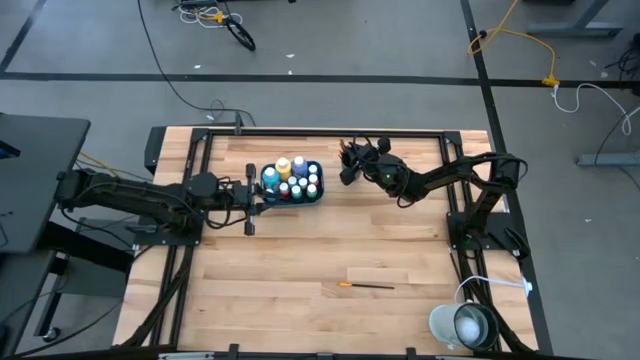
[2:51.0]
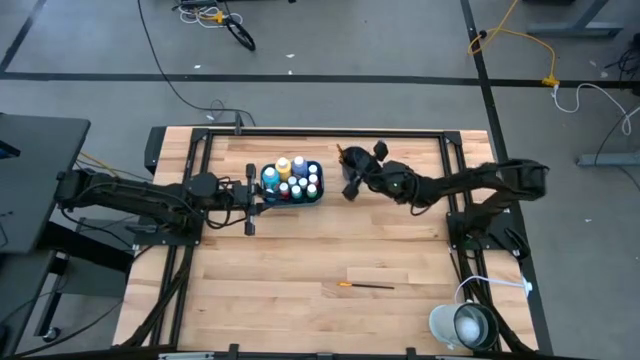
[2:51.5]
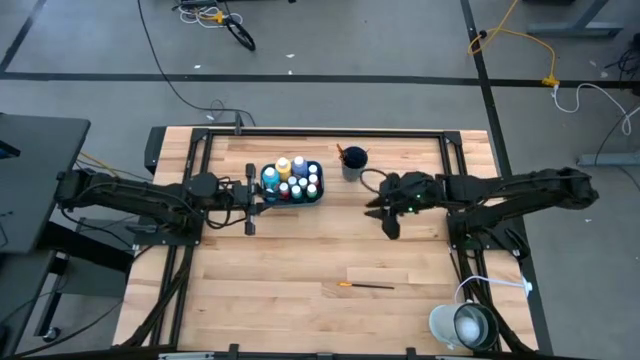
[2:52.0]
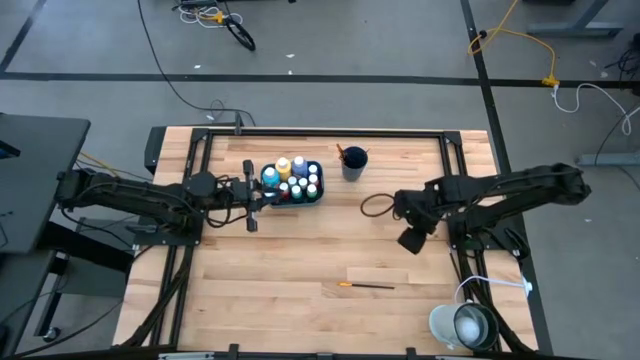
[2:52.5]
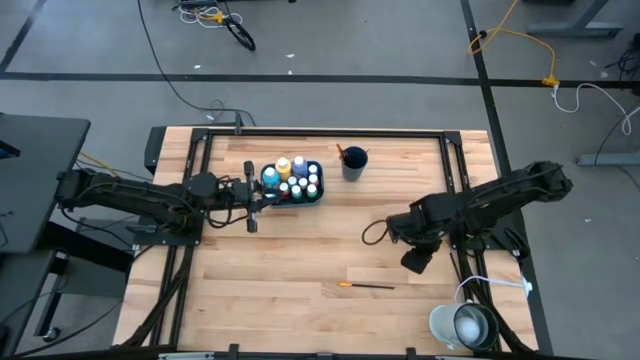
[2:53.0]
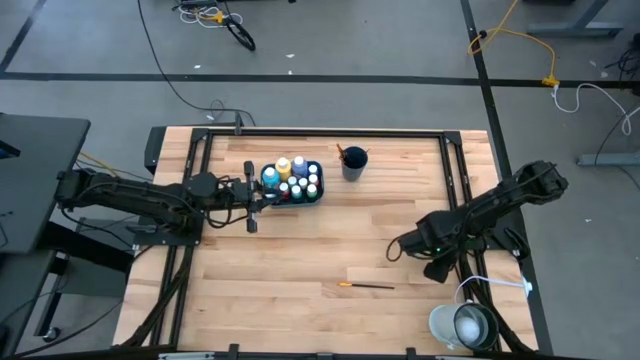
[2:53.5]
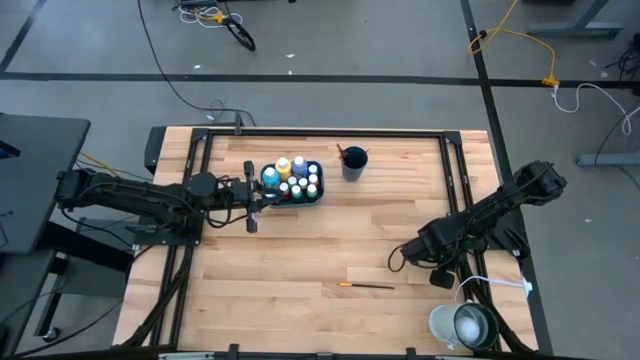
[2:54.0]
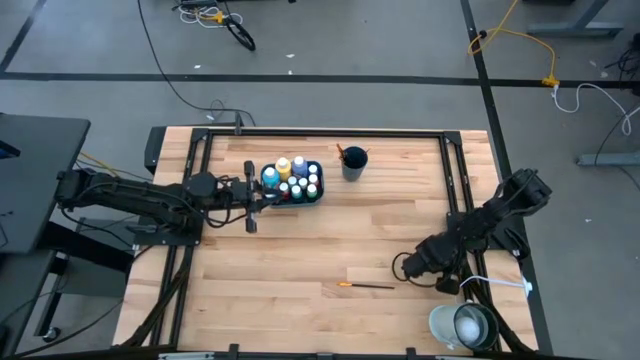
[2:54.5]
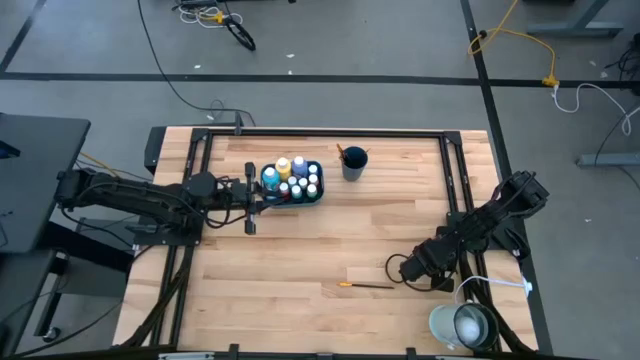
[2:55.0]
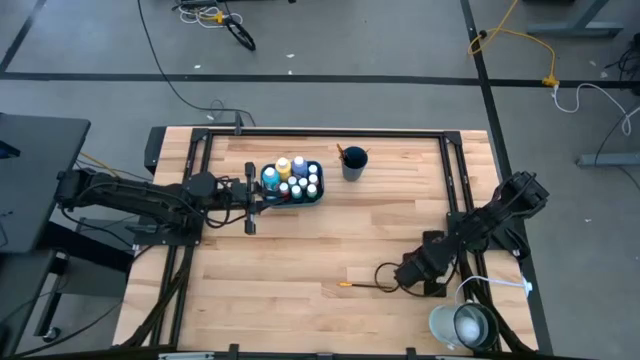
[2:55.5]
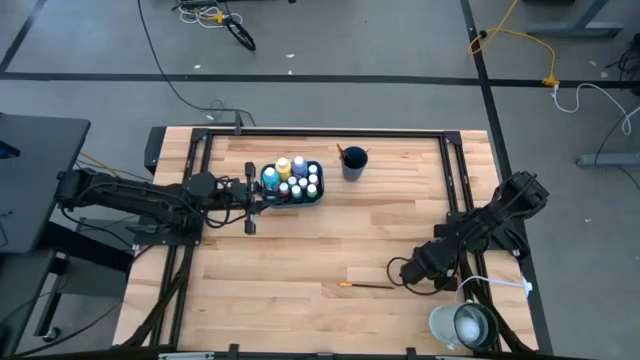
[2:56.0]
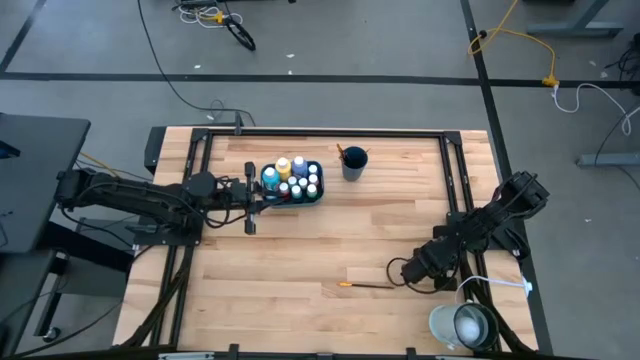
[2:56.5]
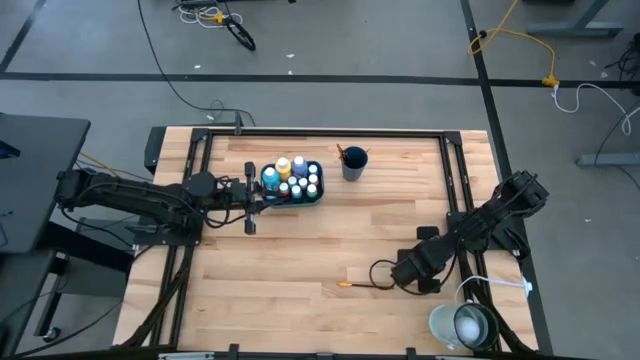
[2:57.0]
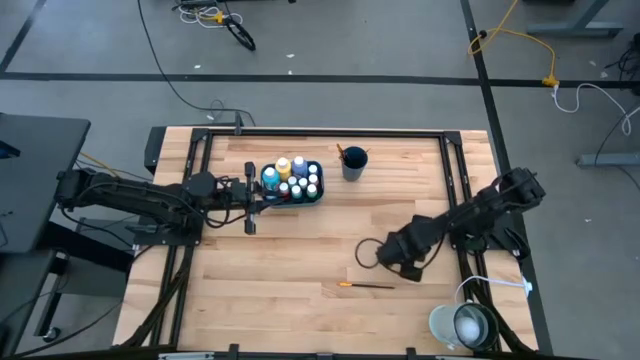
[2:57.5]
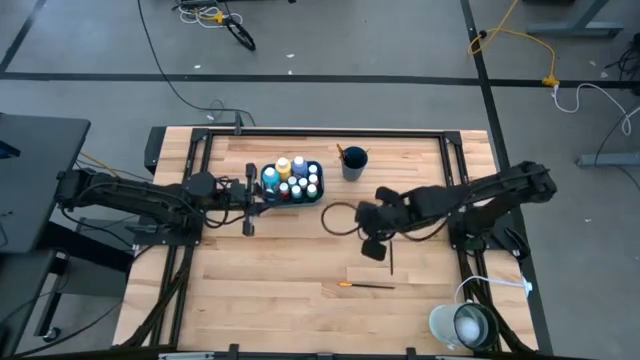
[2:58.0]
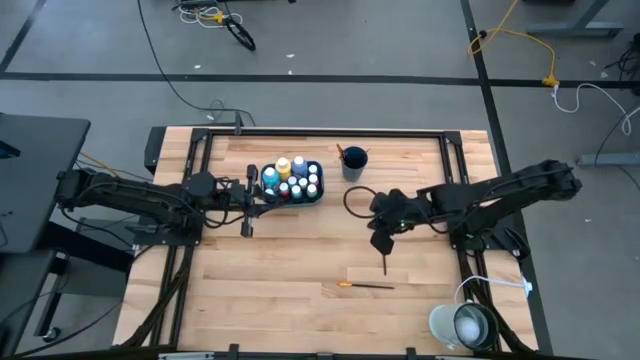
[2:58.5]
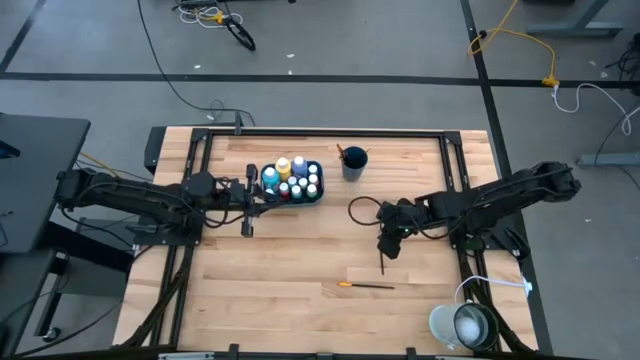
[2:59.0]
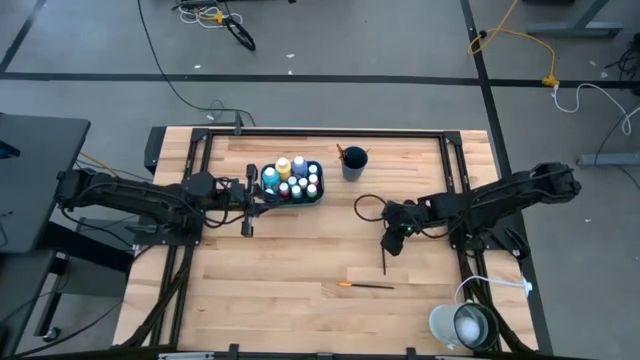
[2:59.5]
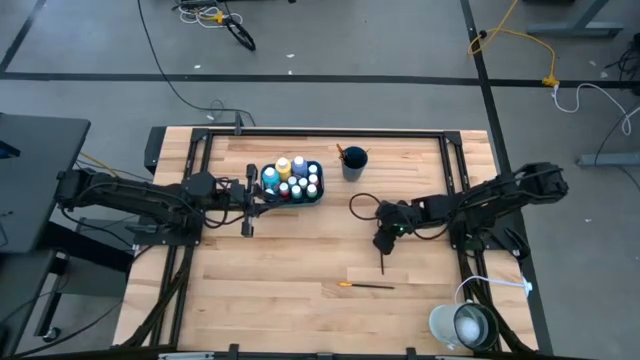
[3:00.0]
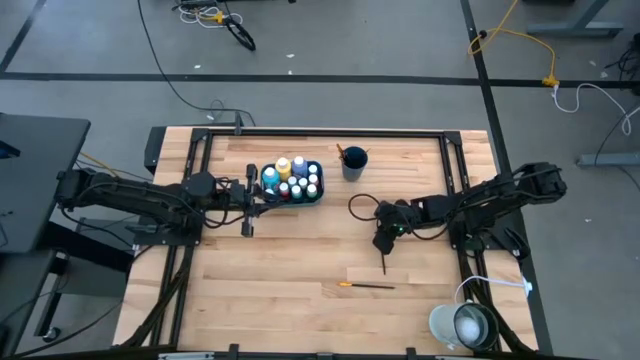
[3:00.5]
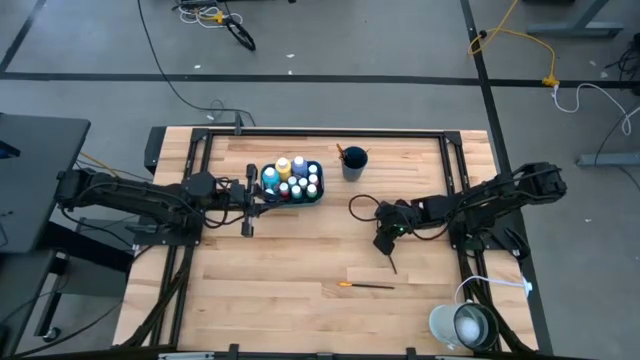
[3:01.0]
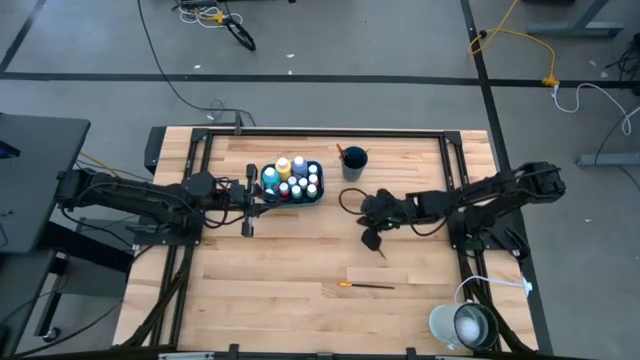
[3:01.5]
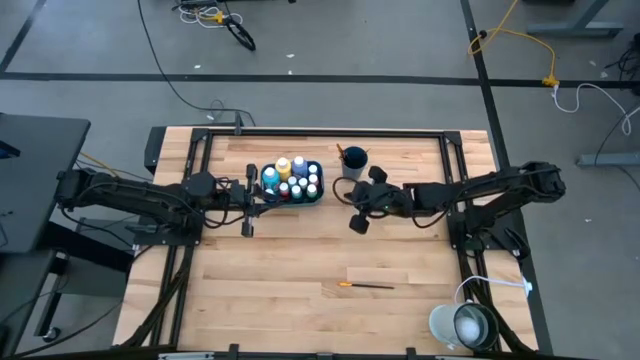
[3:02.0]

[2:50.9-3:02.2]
Task: Pick & Place Paint Supplies
Put the silver paint brush into the blue cup

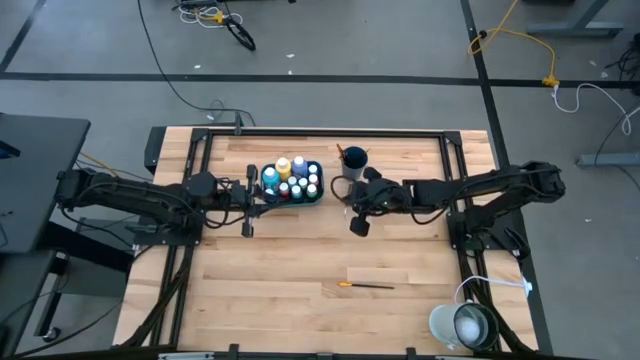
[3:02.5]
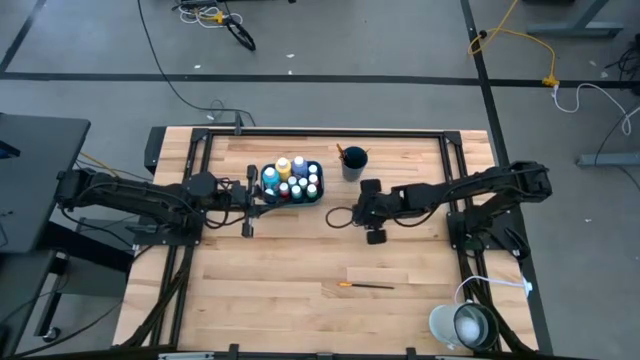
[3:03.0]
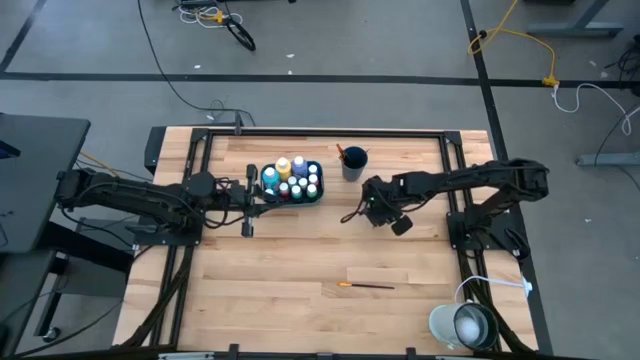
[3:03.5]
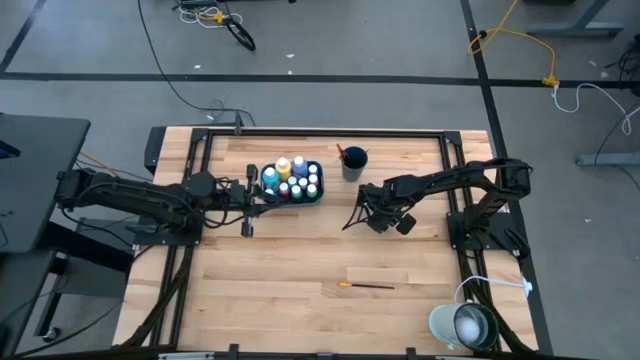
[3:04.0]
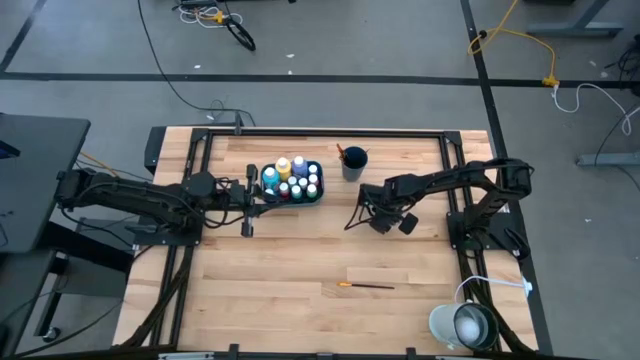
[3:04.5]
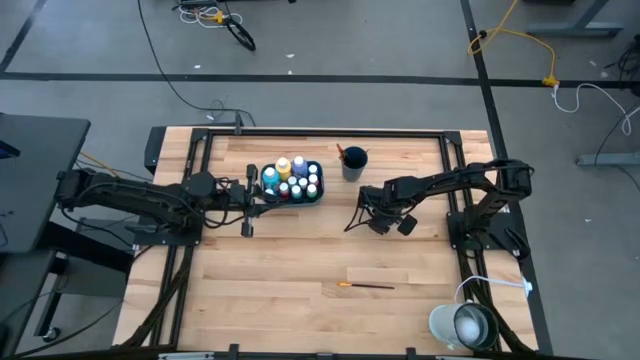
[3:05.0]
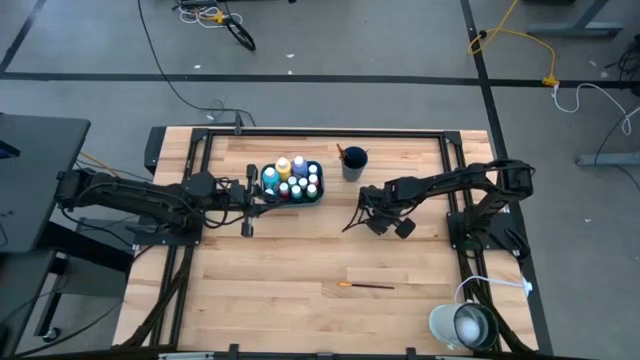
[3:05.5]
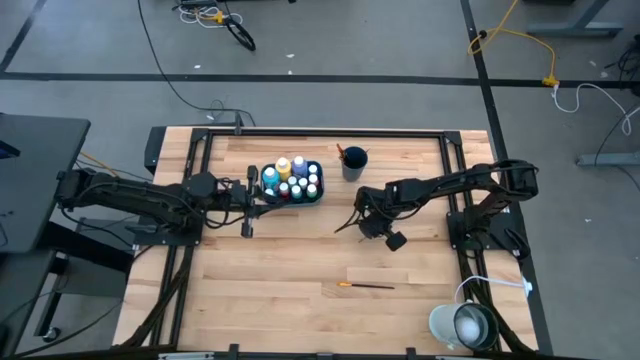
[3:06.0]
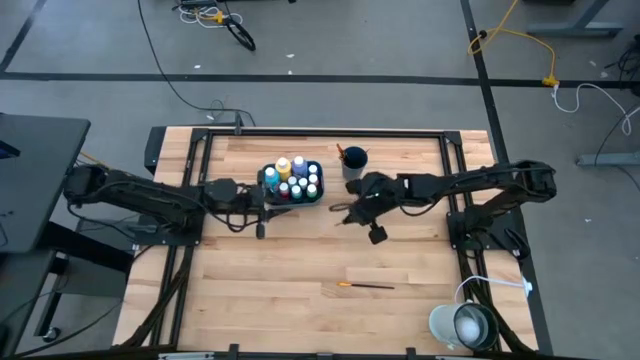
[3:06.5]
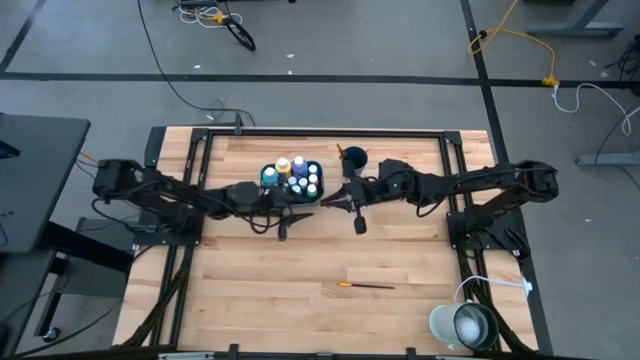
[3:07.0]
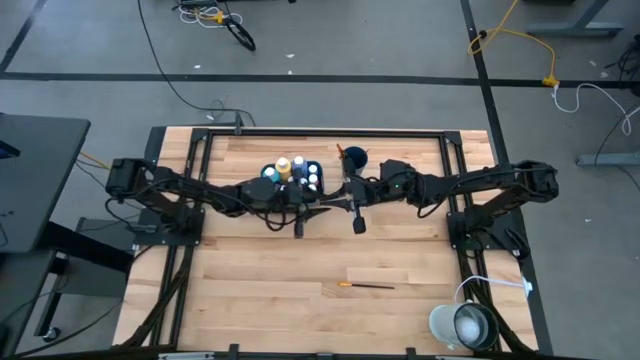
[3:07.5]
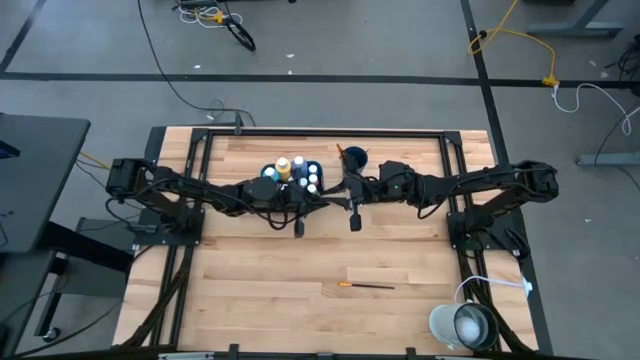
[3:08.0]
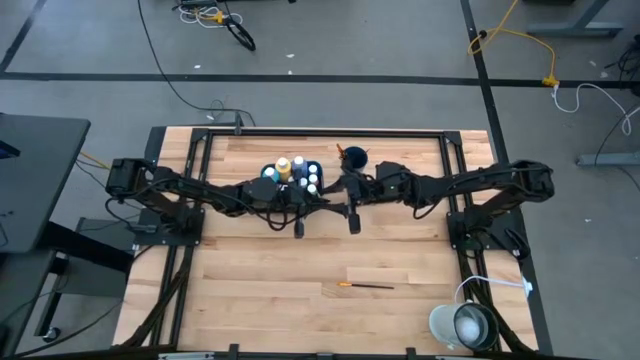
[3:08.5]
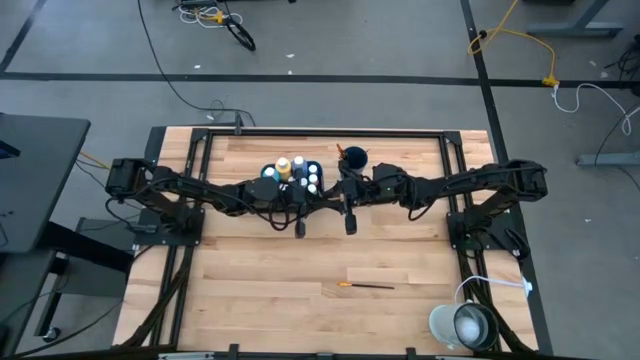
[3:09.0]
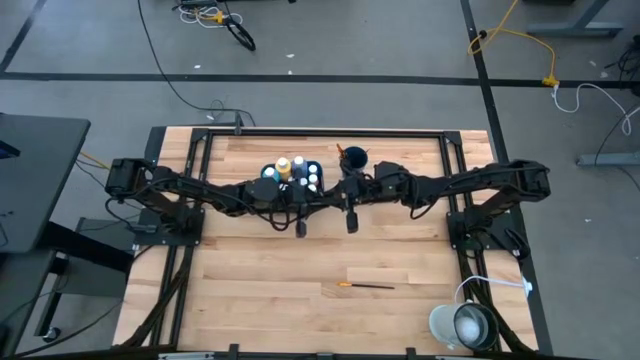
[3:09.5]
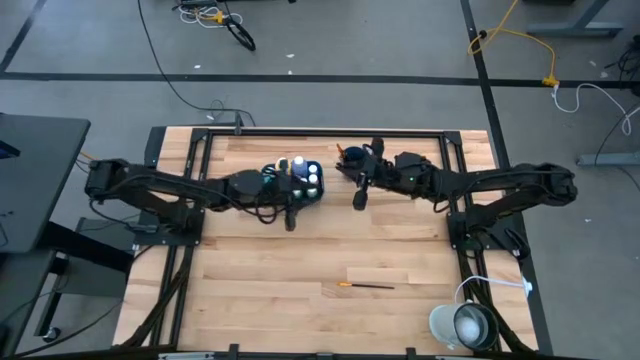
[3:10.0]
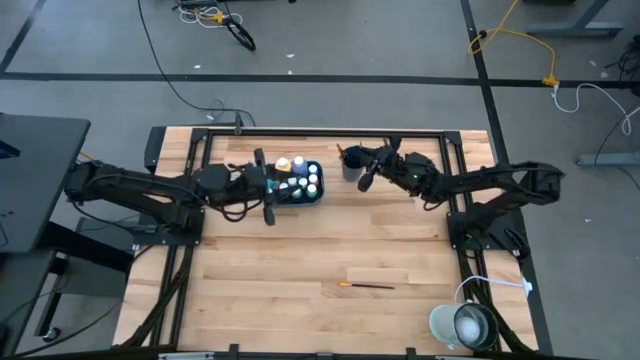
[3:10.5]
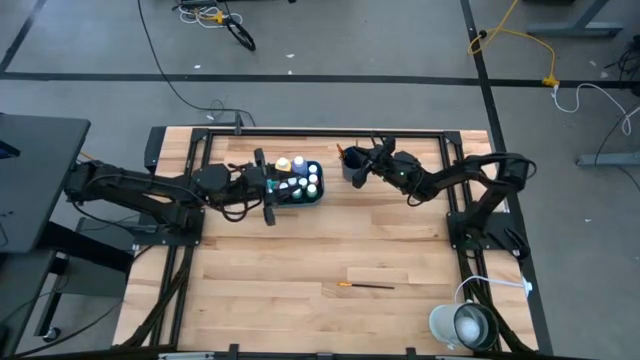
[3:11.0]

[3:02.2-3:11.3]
Put the silver paint brush into the blue cup

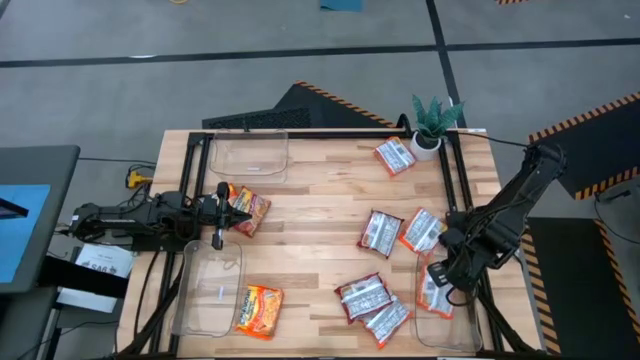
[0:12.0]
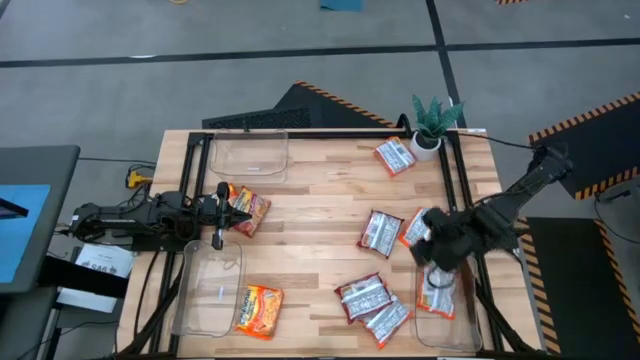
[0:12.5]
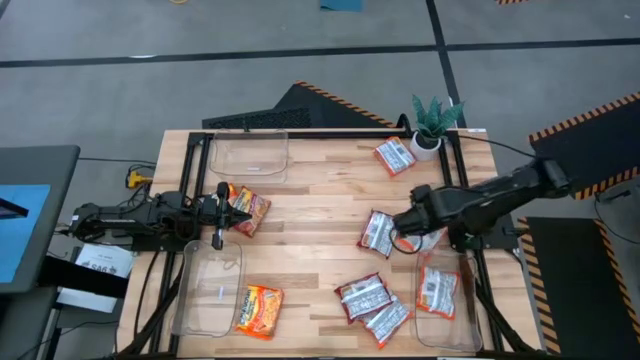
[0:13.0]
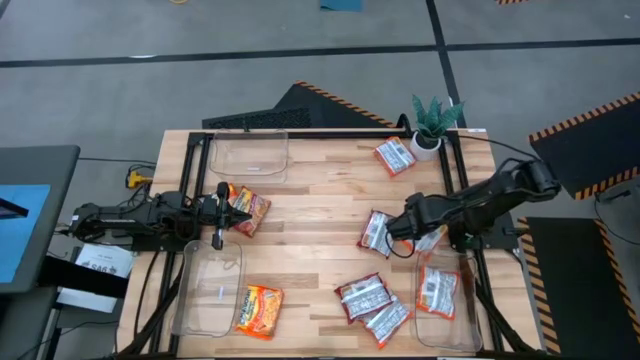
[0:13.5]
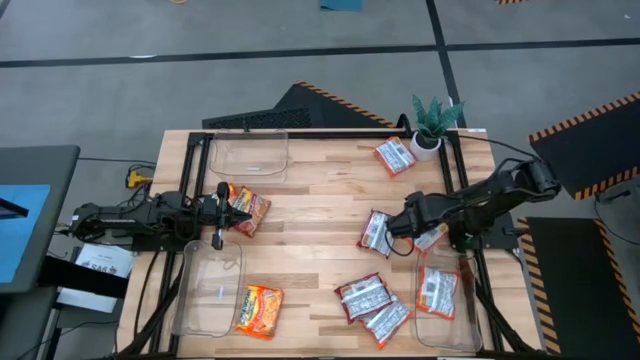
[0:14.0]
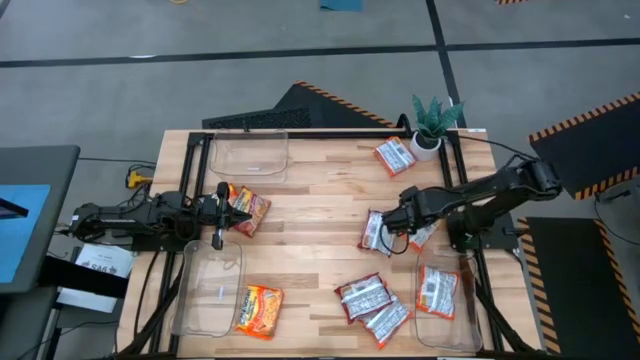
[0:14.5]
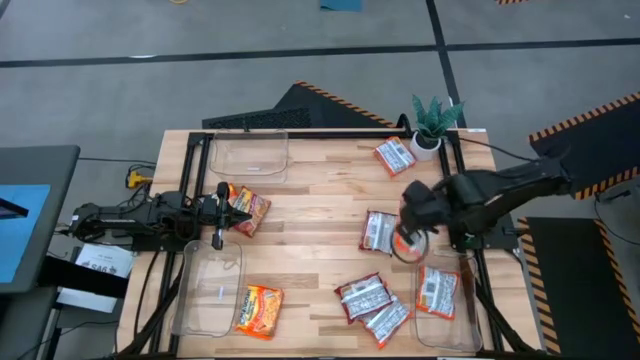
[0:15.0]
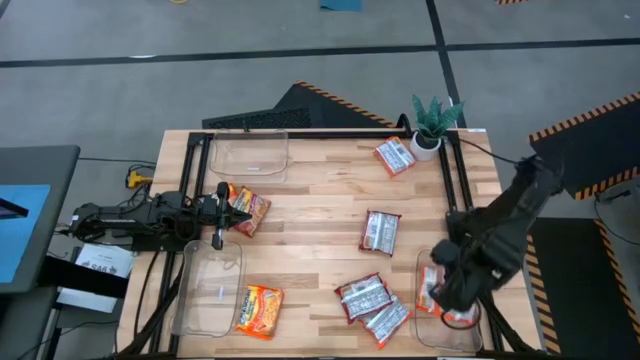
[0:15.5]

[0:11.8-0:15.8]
Task: Sort Maruchan noodles
Put the orange noodle pack into the bottom right transparent bin
